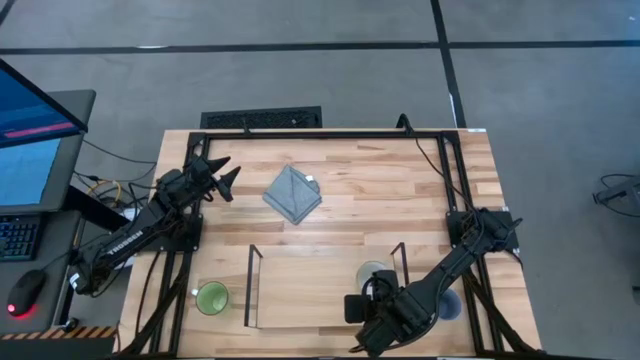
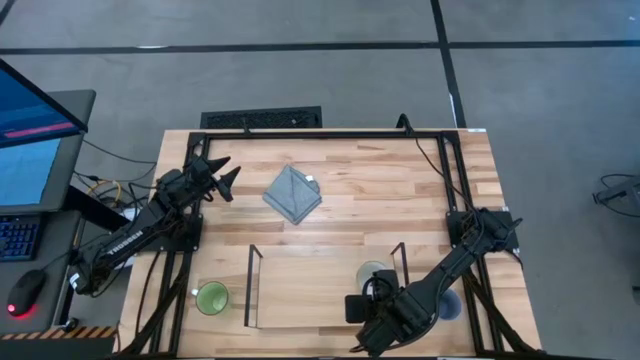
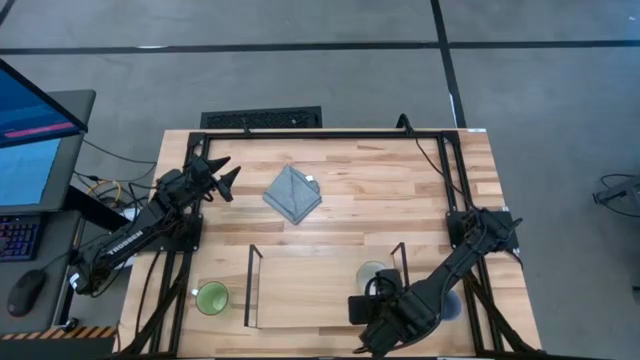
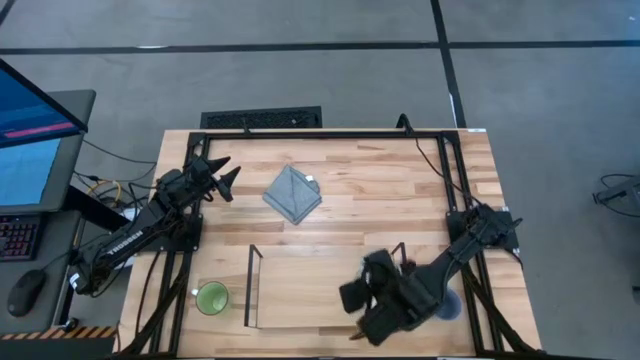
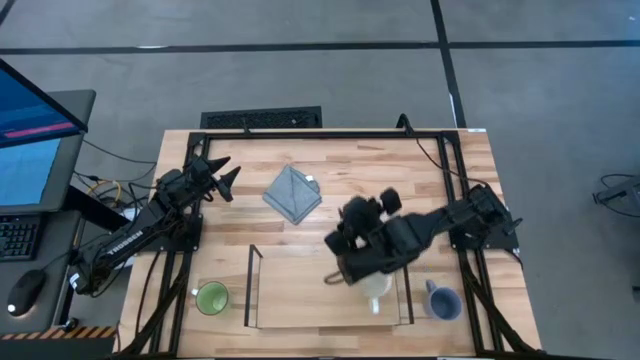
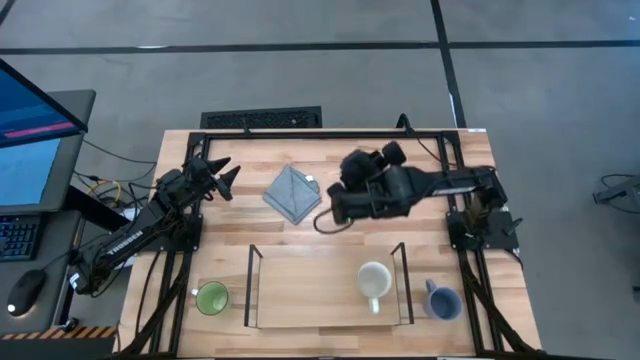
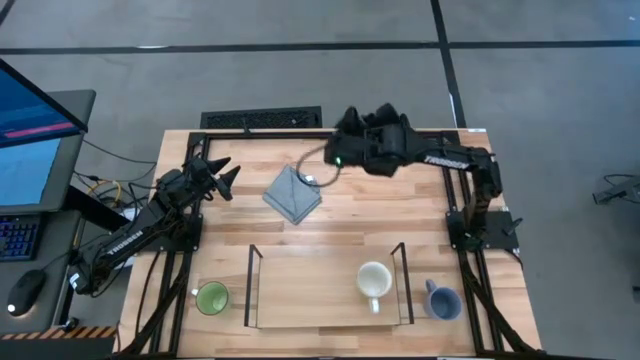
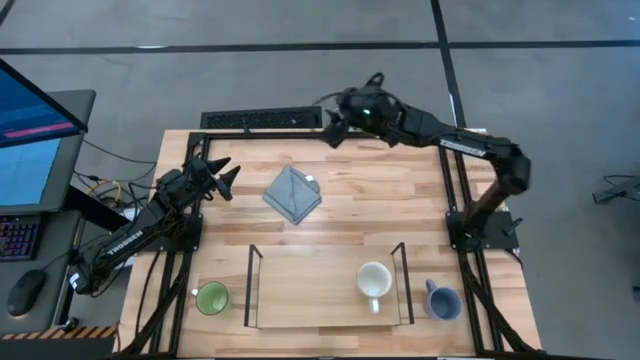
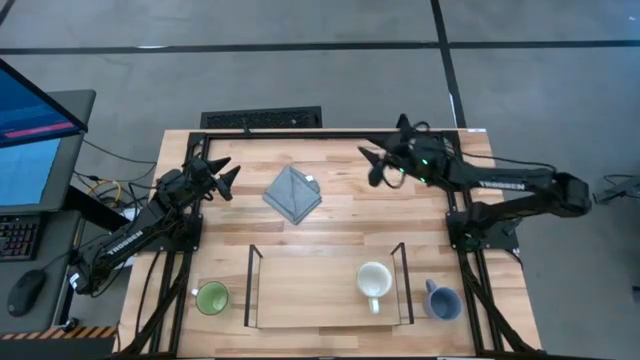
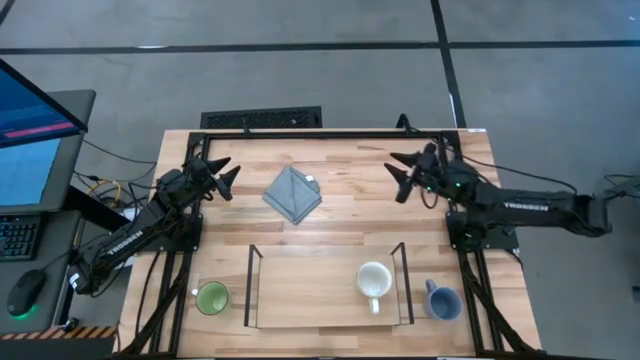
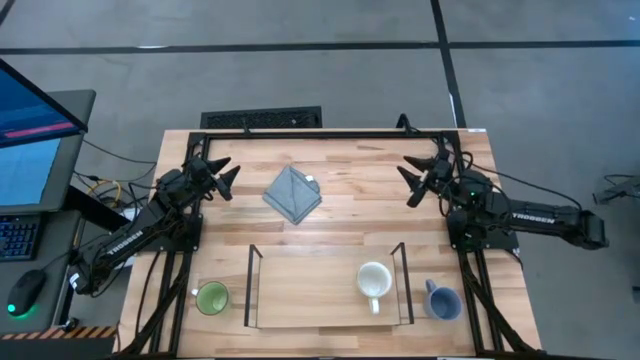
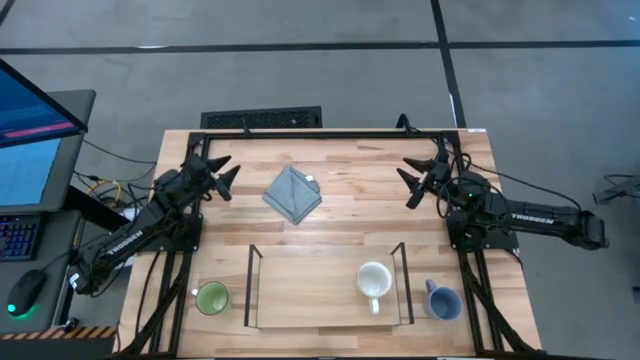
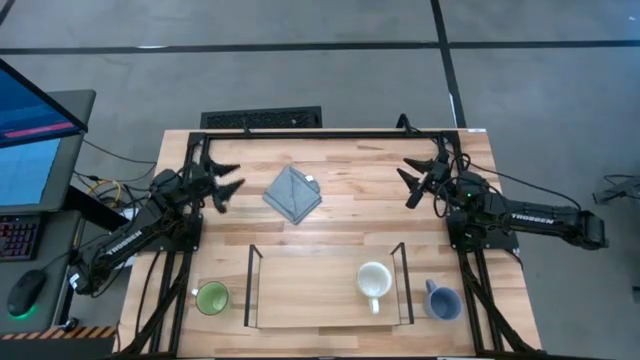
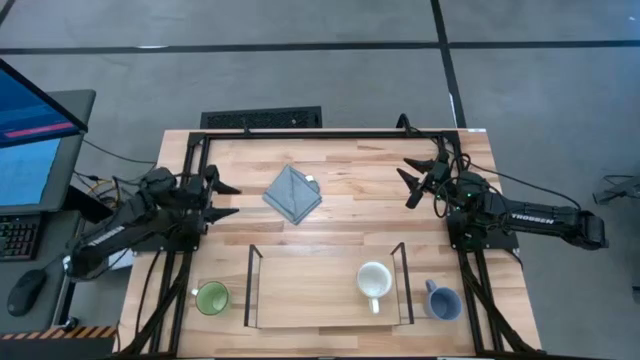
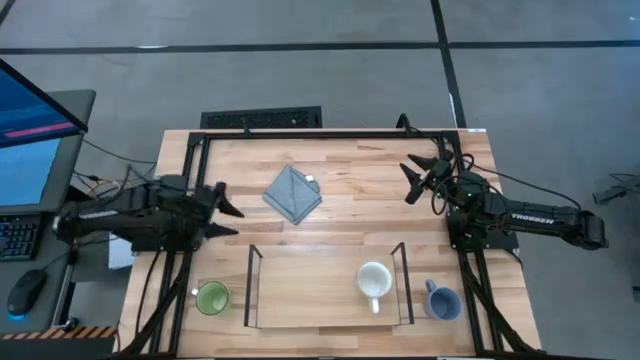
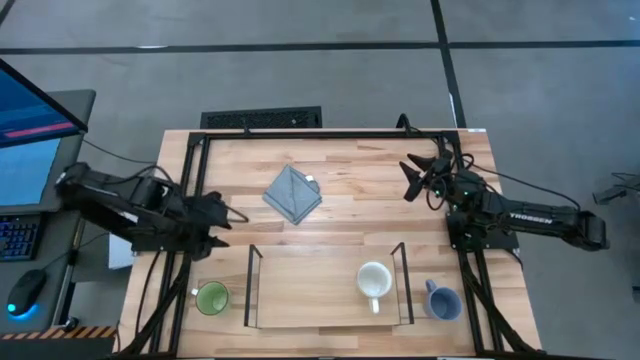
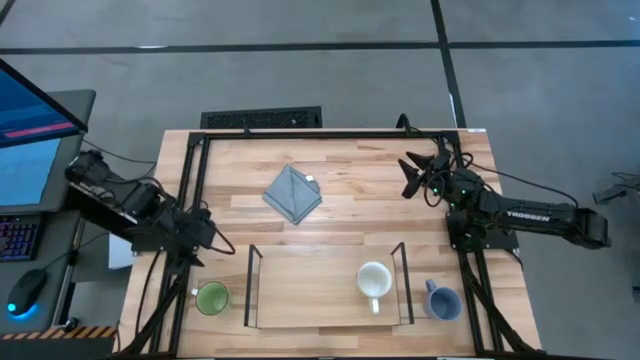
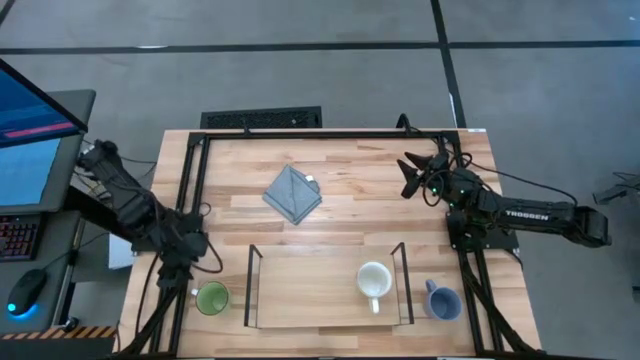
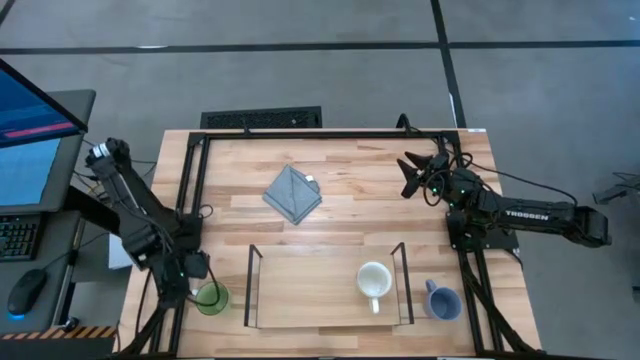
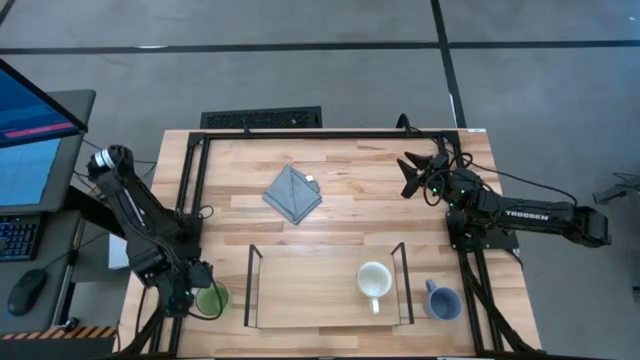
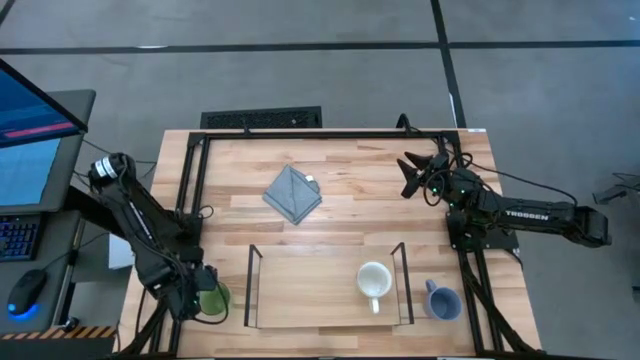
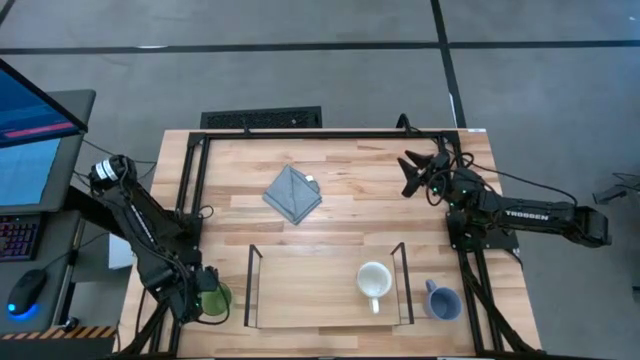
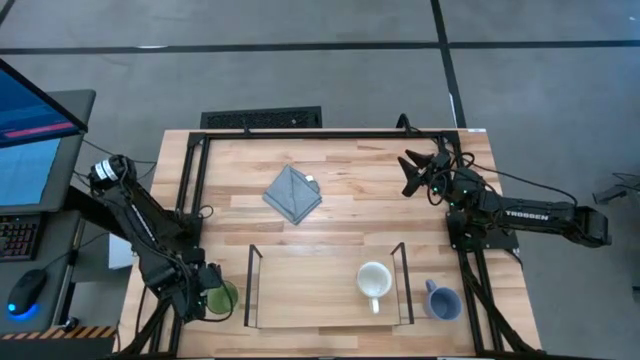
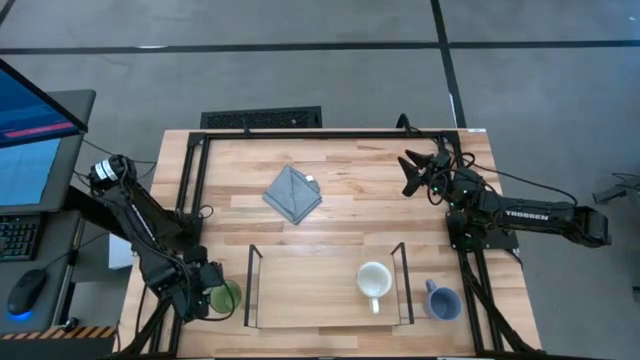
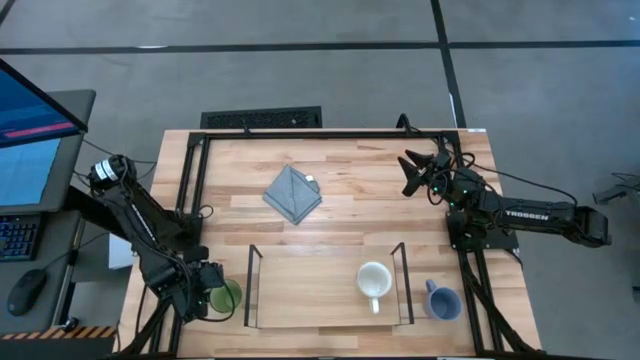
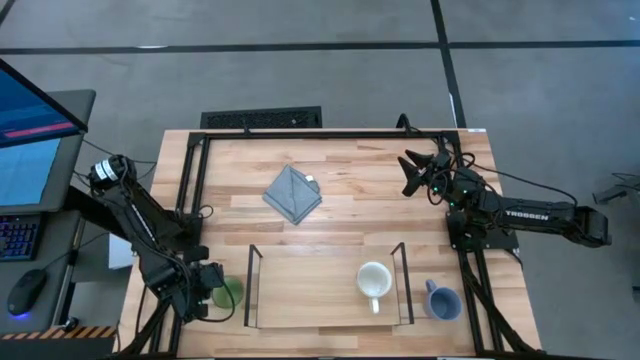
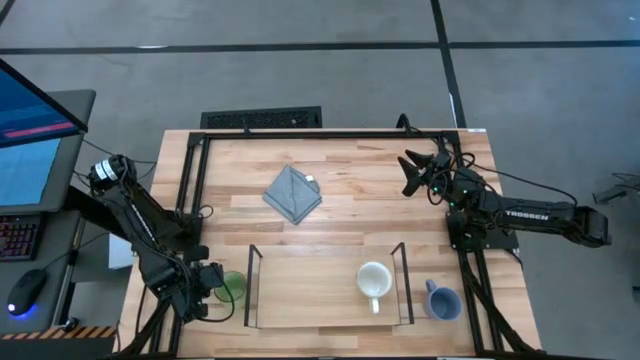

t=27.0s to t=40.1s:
Task: Stack small to large cups/mugs on shelf
Put the green mug on the shelf

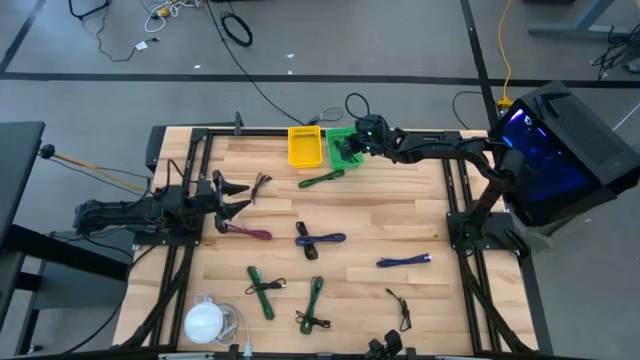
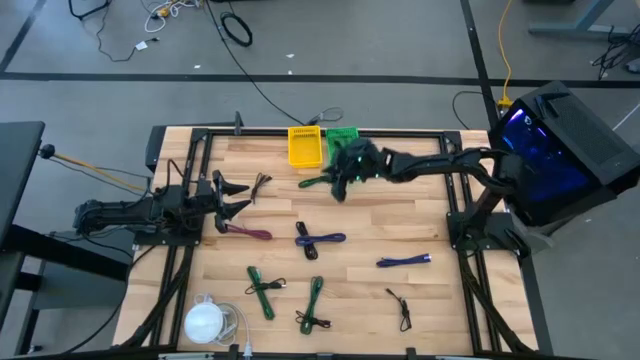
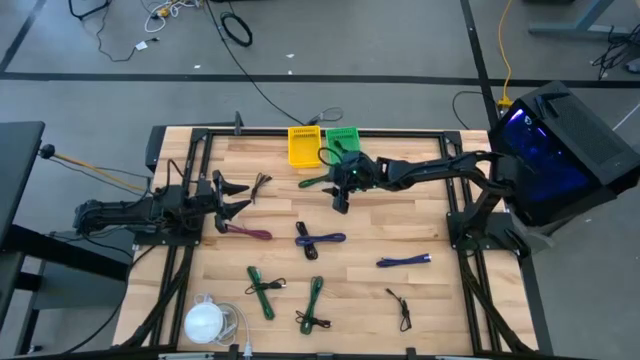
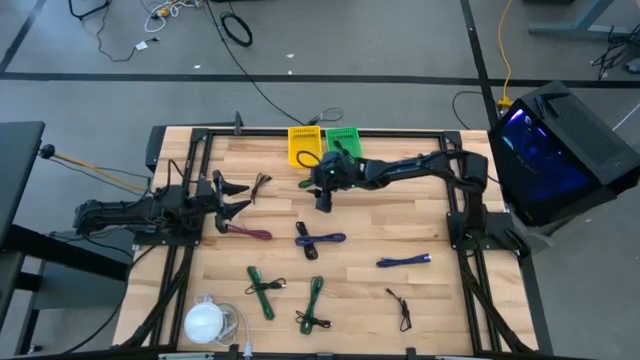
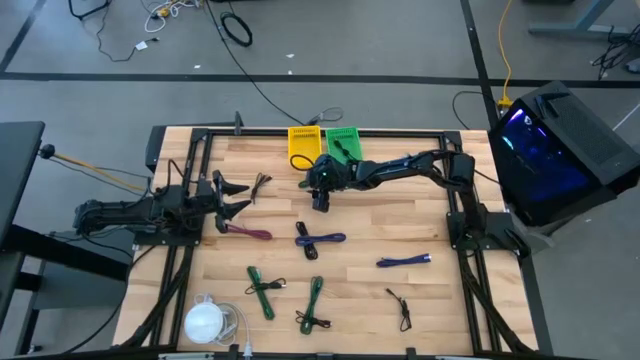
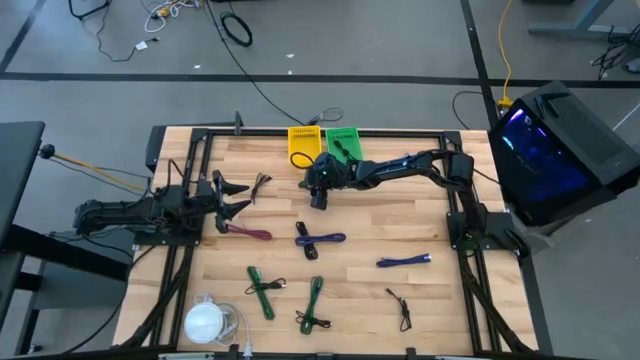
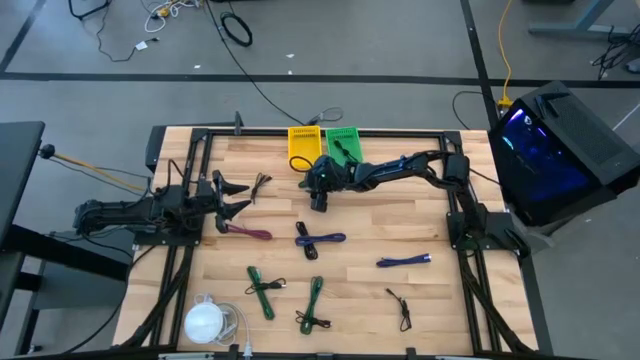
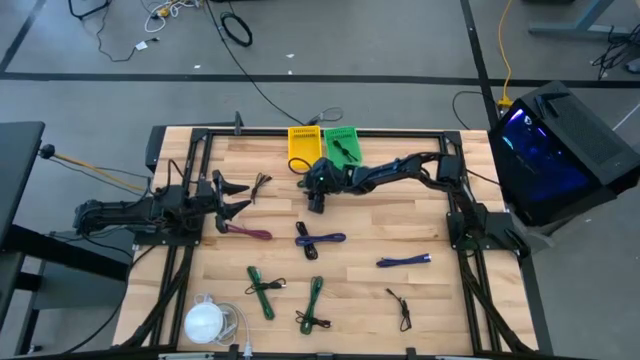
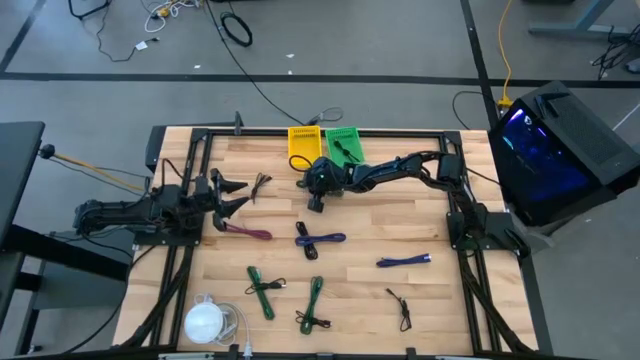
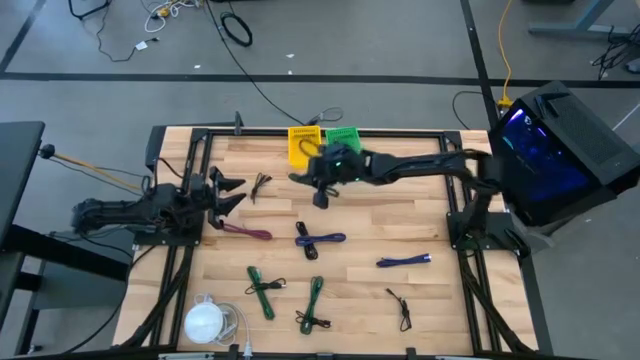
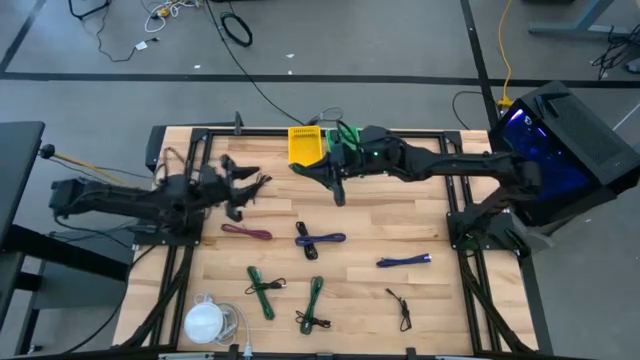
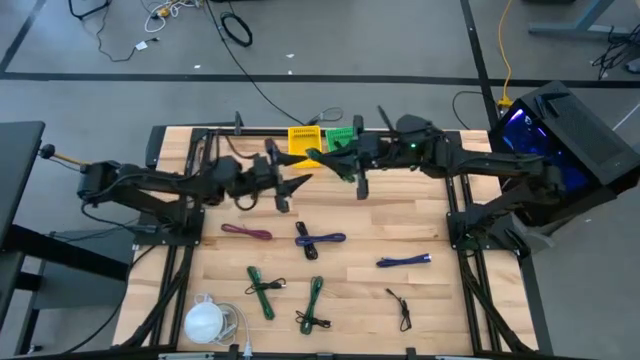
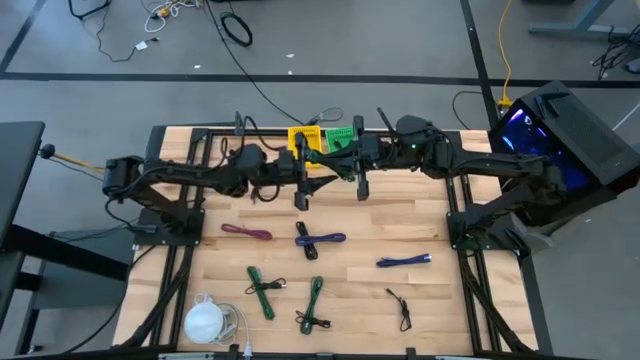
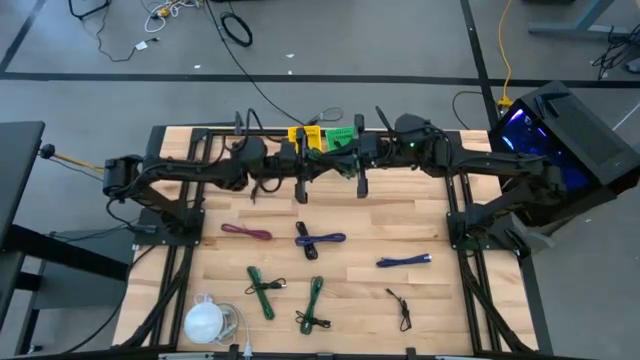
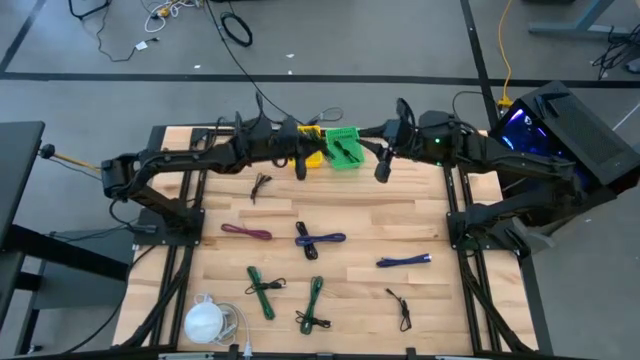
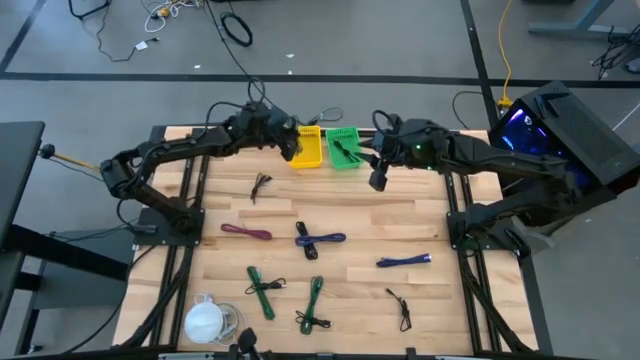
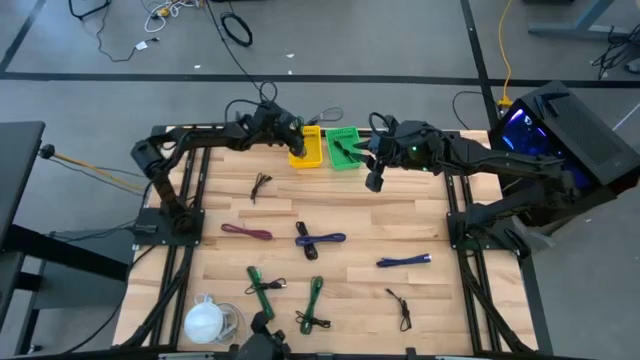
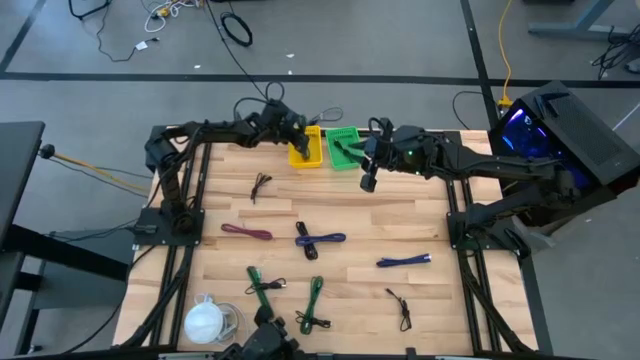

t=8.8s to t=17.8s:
Task: Pick & Place USB Port
Put the green charger cable into the yellow bin
